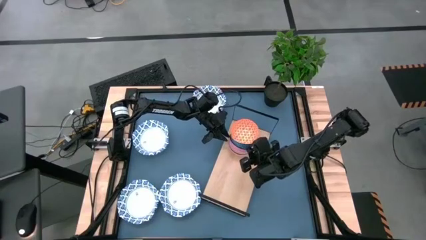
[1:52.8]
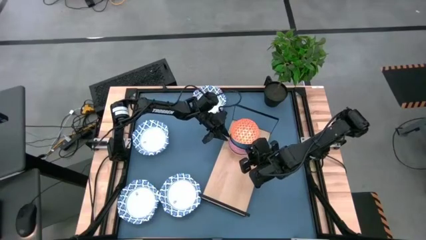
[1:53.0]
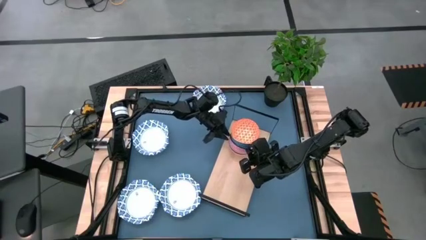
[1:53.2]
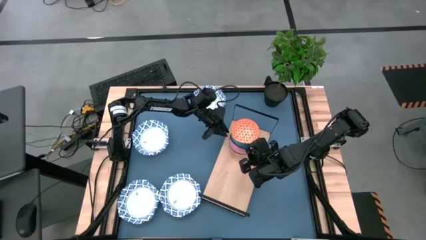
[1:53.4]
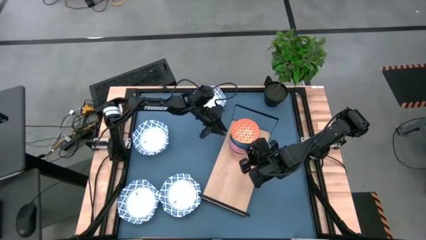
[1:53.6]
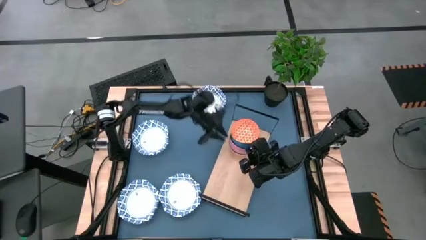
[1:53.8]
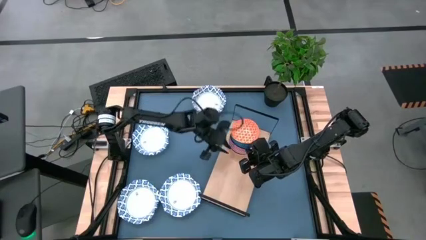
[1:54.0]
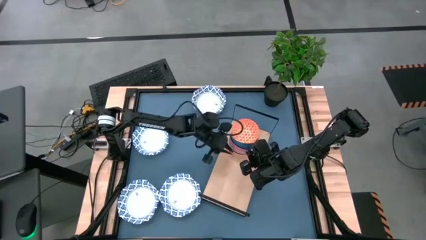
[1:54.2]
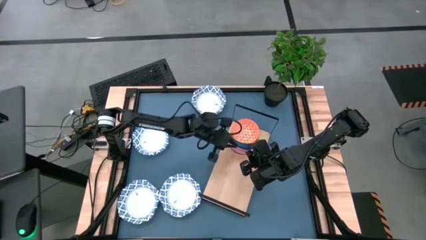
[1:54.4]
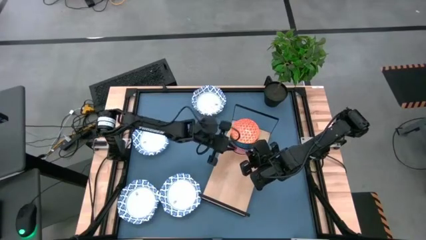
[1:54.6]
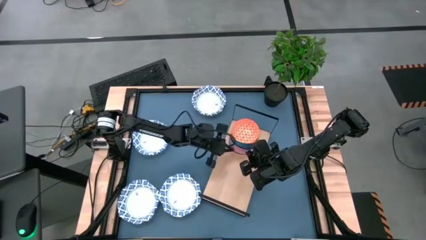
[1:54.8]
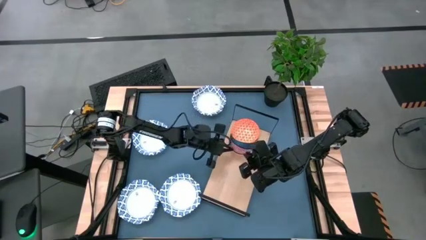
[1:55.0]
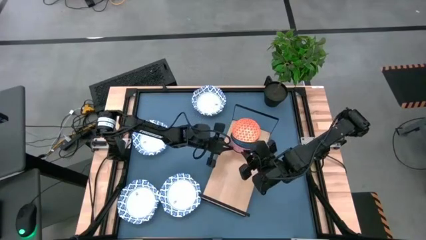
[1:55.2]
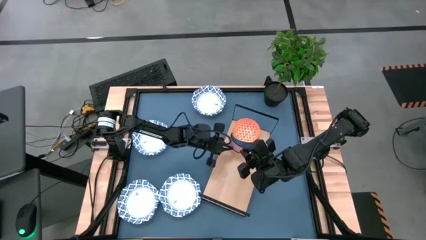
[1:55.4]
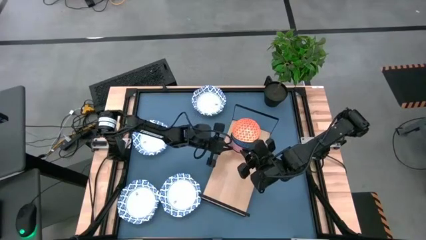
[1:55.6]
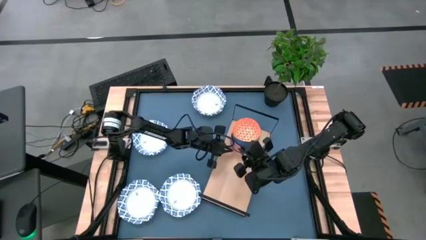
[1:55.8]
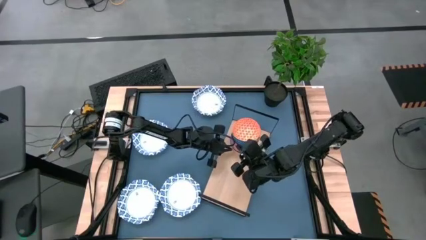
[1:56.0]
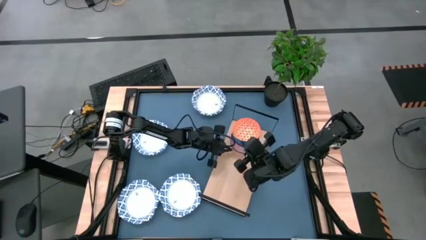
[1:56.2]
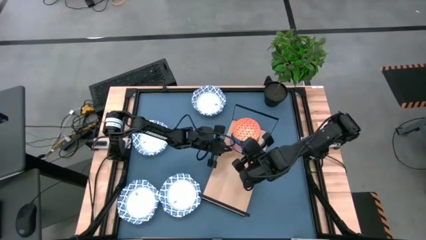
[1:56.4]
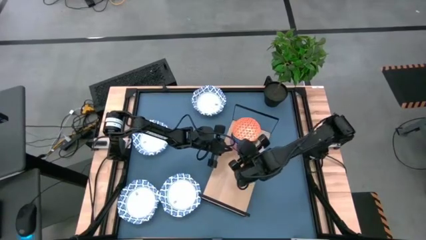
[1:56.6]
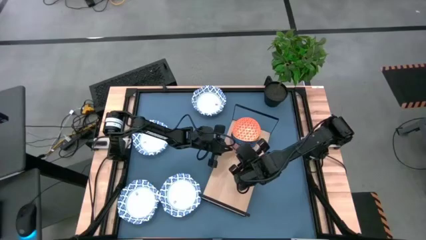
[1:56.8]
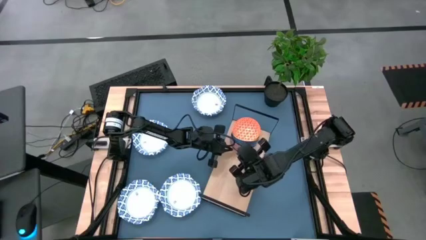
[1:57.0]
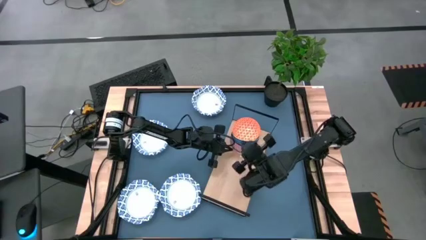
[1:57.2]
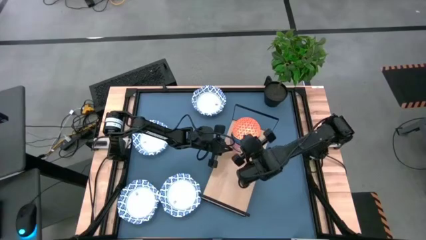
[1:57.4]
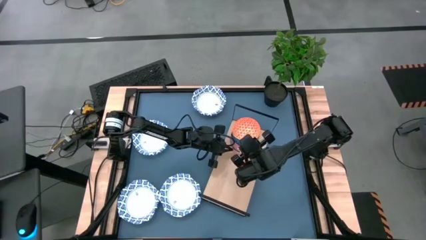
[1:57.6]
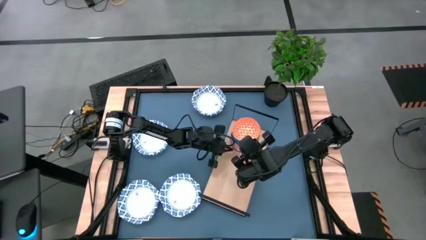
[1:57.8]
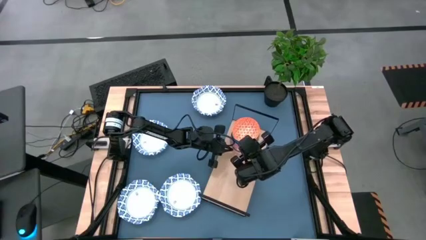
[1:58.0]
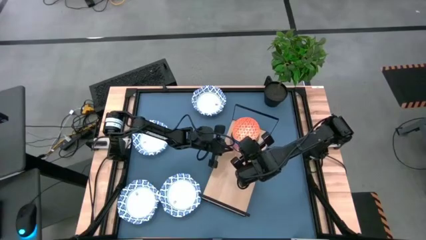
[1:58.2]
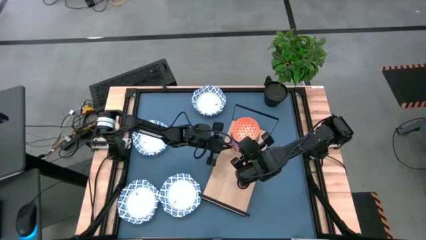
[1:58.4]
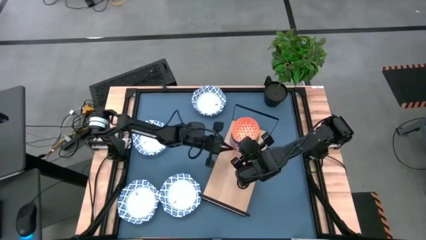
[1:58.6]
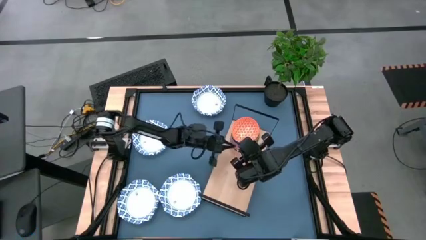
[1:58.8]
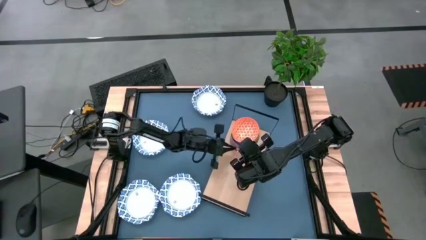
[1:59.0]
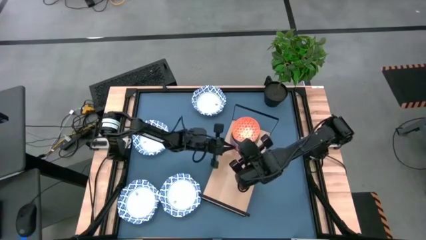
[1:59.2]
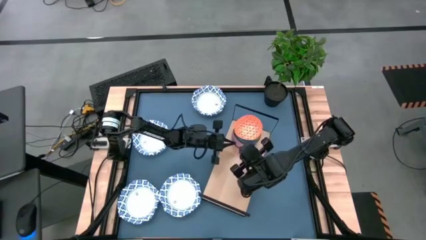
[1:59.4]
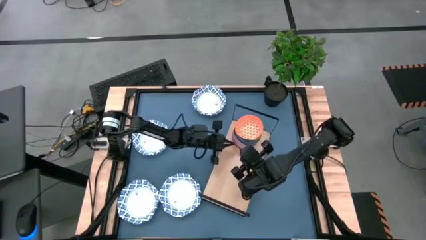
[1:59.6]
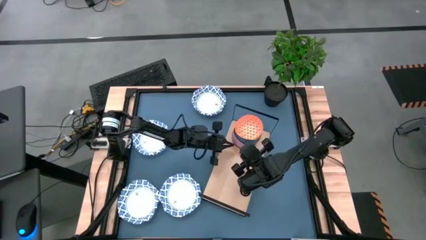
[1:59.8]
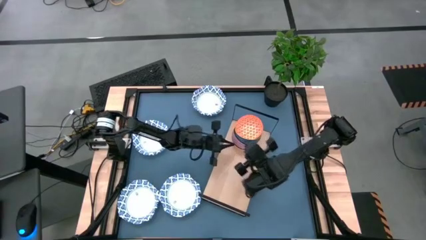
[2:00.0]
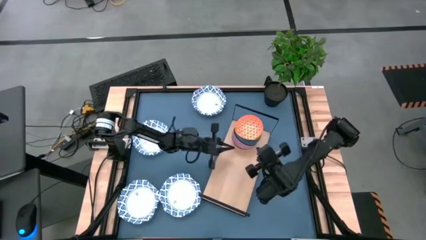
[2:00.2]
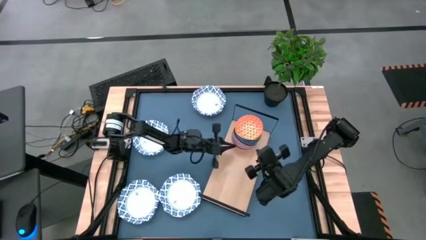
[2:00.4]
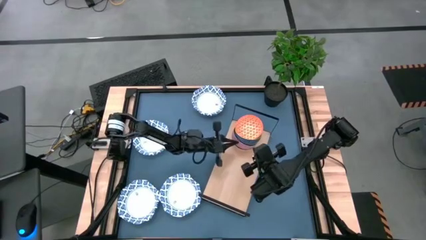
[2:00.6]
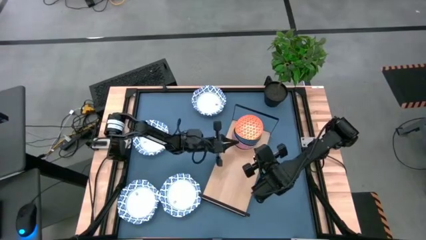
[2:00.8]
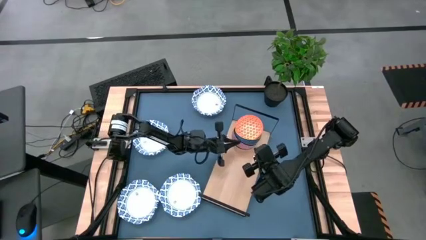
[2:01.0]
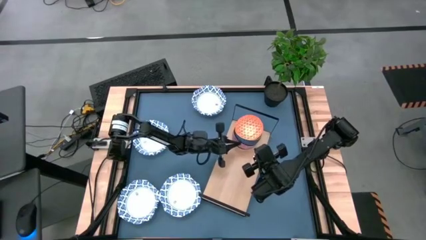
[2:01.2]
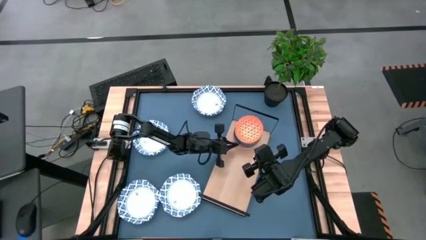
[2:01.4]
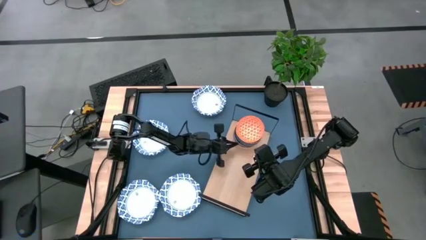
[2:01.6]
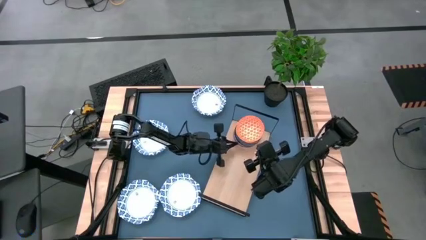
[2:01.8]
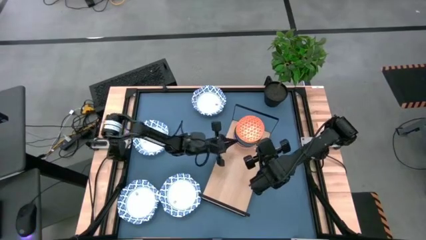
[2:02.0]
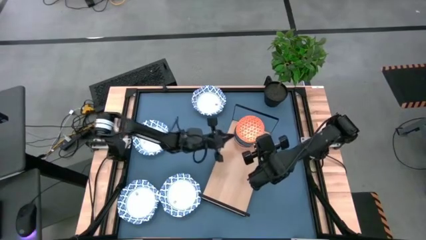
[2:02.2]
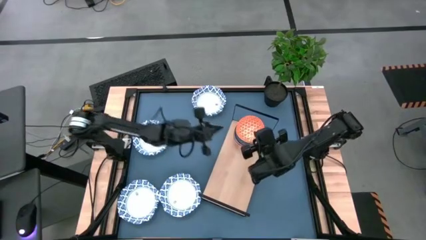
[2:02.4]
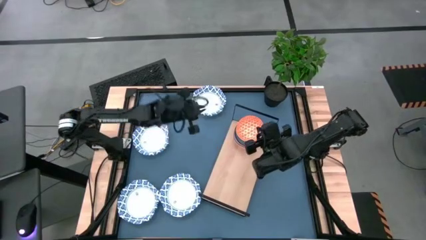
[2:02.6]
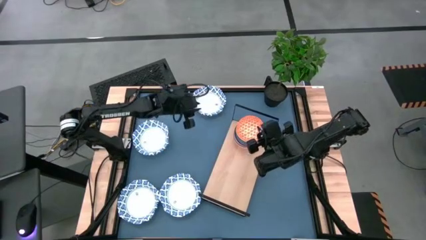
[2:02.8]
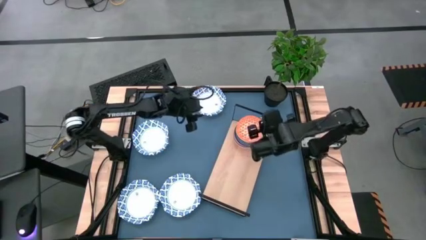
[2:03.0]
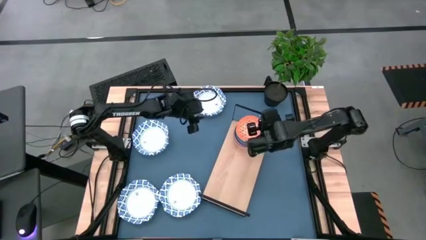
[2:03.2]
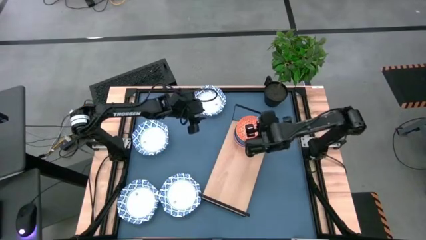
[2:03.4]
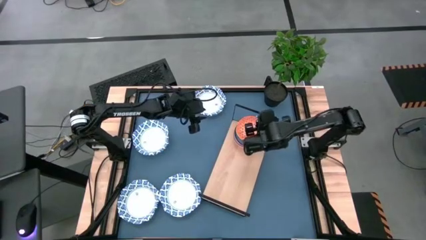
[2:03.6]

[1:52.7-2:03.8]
Task: Place and stack bowls onto a shelf
Adjust the stacked bowls on the shelf

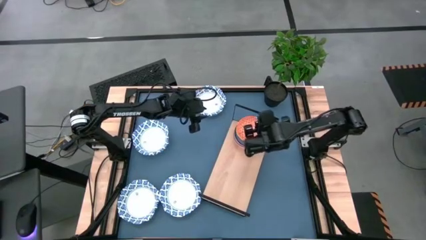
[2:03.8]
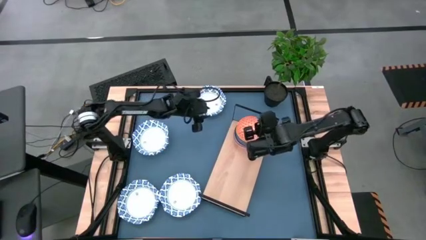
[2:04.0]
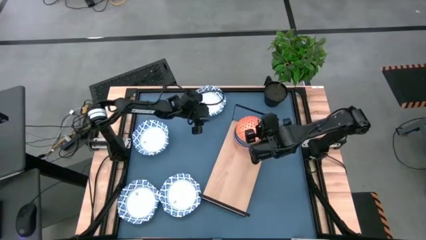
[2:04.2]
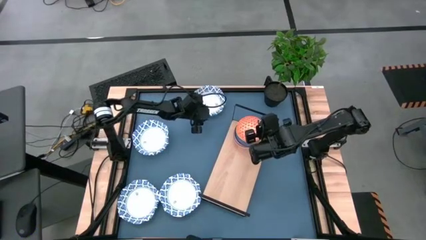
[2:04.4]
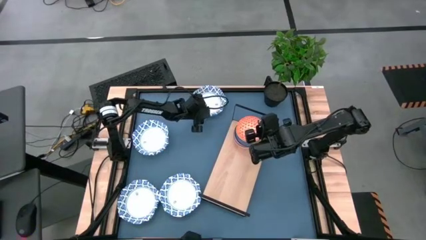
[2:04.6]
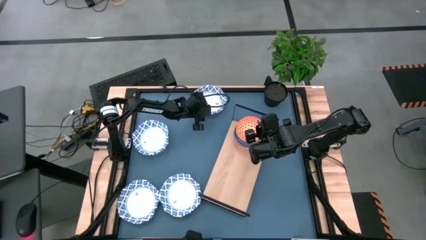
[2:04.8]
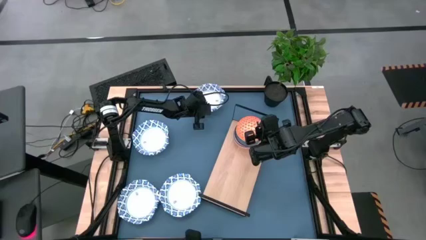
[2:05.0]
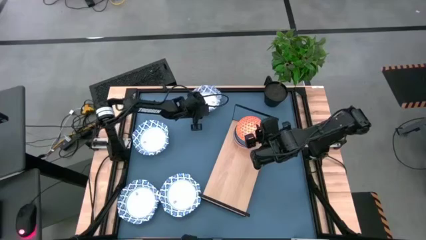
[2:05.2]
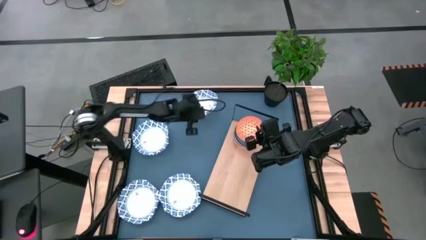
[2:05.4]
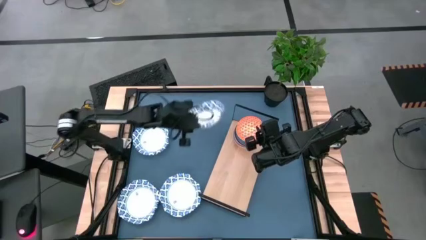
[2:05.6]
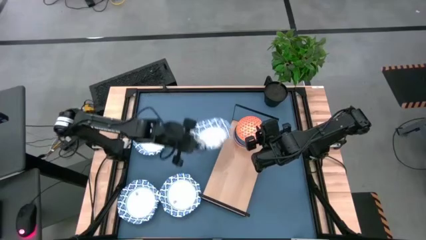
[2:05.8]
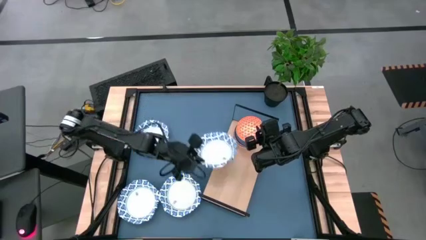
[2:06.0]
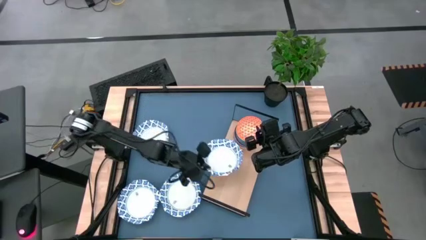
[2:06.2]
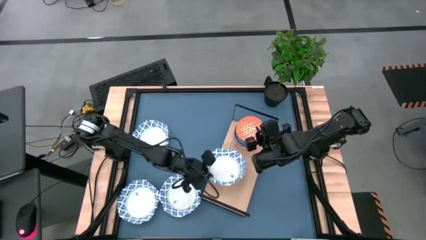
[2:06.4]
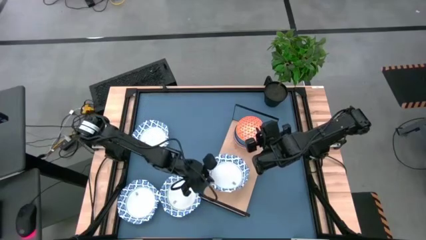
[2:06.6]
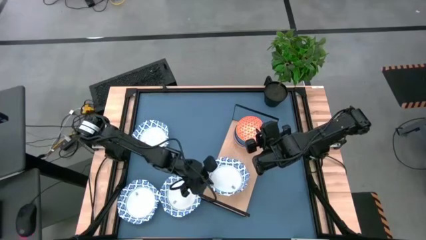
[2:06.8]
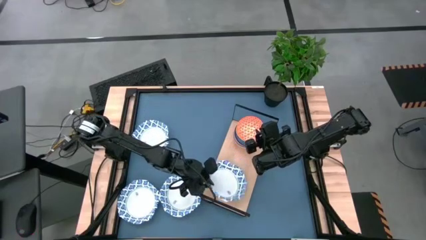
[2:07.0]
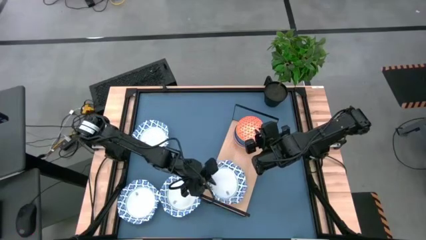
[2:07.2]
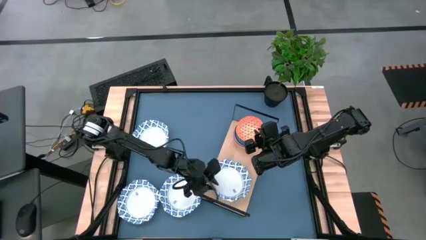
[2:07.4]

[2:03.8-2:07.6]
Put the white pattern plate on the shelf

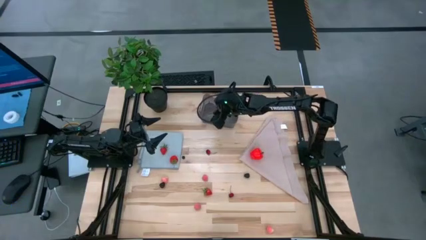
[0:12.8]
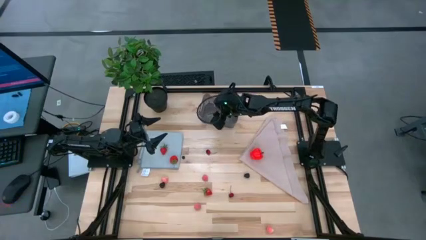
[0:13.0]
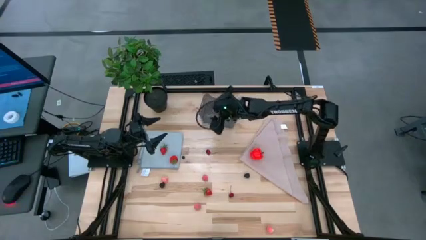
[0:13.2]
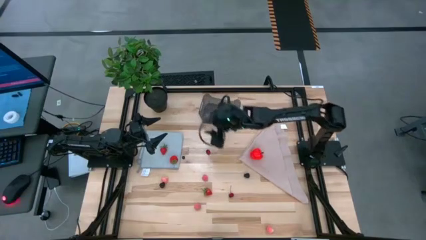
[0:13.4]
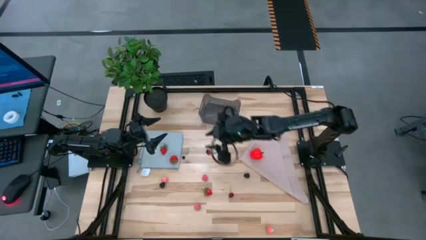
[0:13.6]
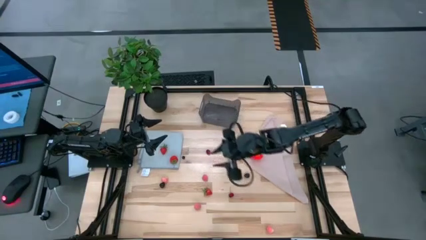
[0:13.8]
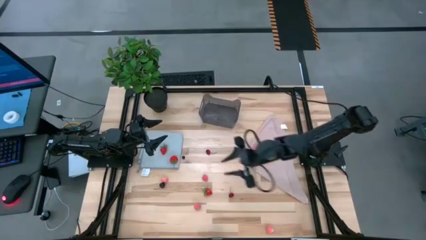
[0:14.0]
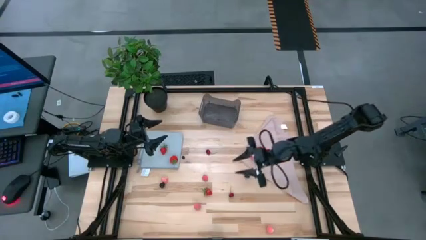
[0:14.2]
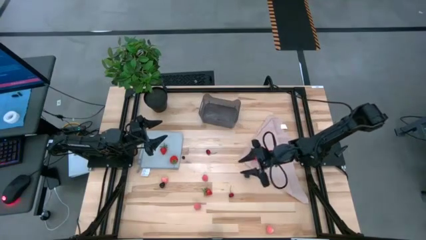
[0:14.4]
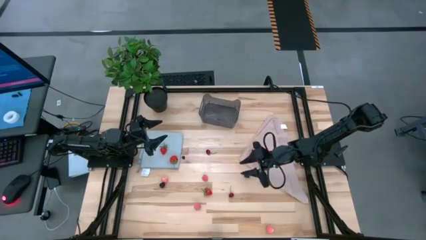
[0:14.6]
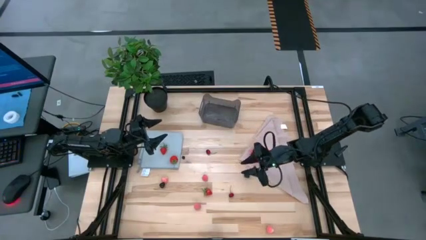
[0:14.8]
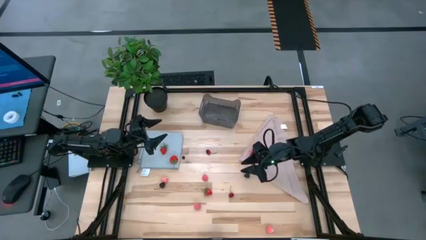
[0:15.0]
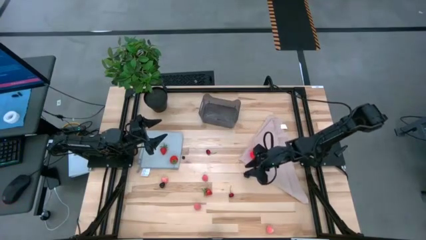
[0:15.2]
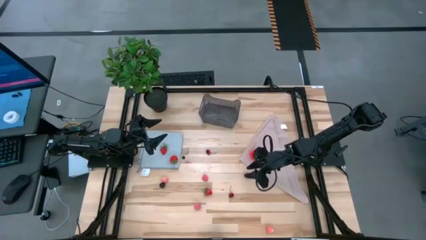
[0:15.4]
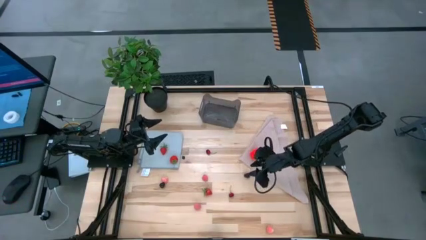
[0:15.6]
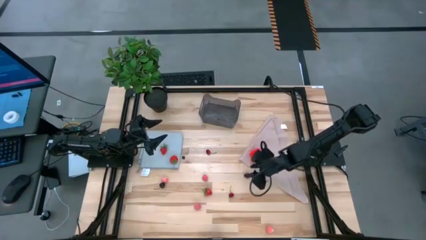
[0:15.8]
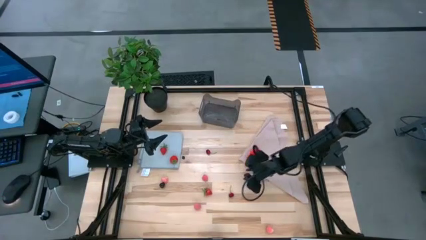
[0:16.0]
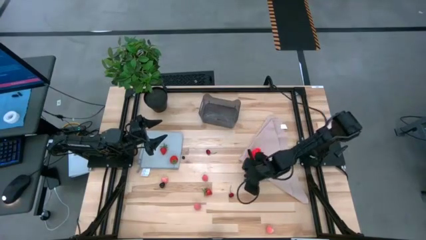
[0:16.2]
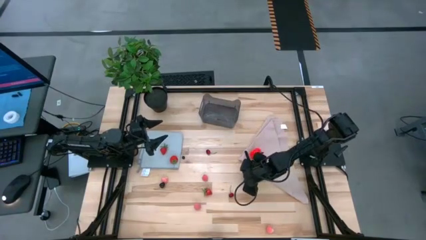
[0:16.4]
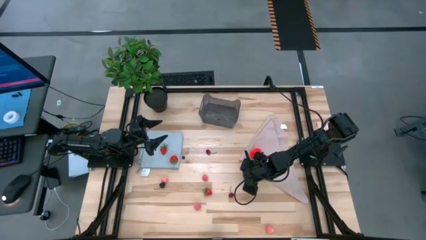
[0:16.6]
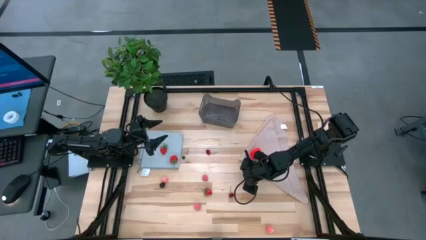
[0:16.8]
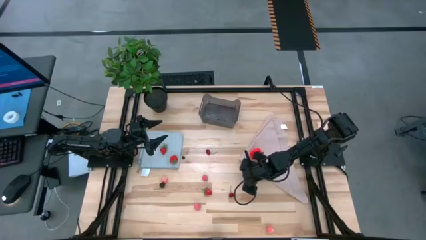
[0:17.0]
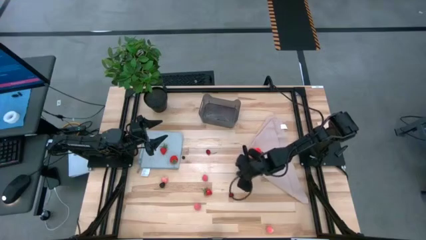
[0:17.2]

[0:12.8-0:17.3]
Task: Pick and placing Produce into tupperware
Put the blackberry into the black bin
